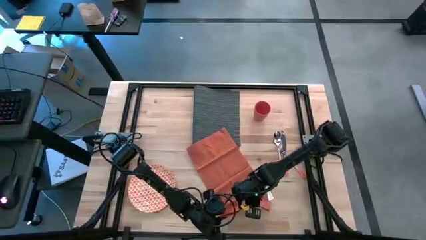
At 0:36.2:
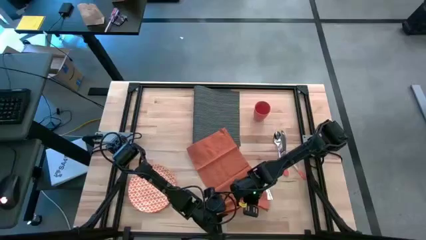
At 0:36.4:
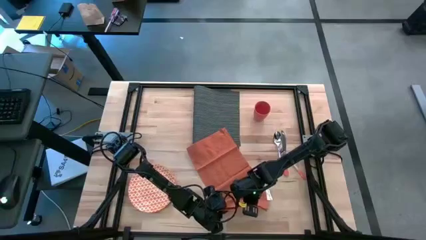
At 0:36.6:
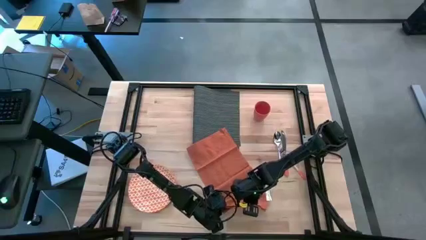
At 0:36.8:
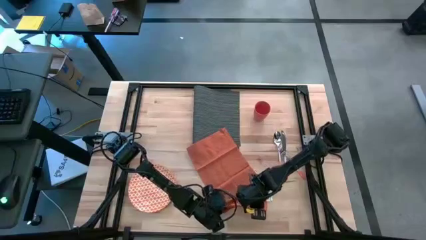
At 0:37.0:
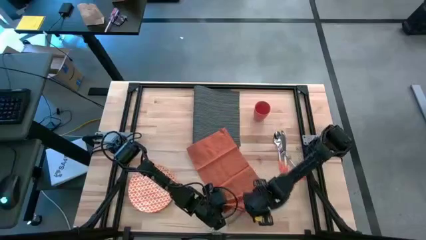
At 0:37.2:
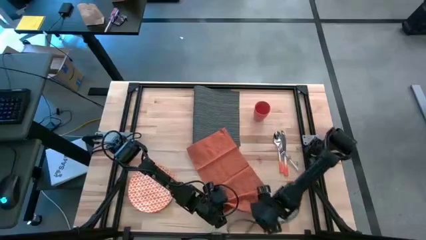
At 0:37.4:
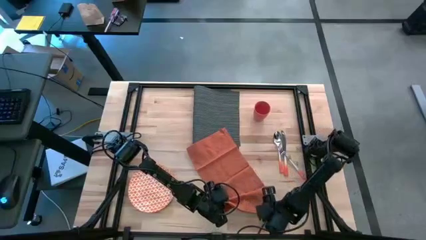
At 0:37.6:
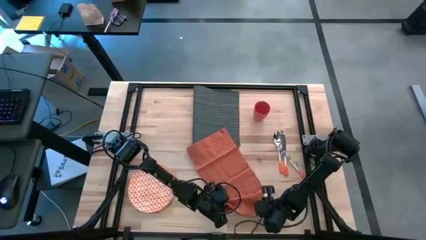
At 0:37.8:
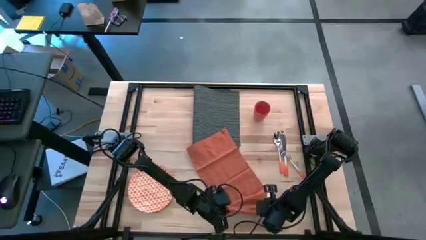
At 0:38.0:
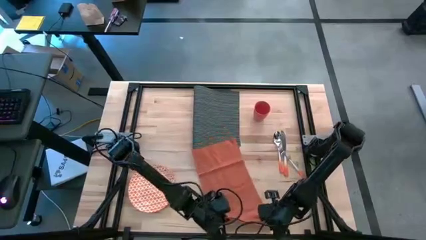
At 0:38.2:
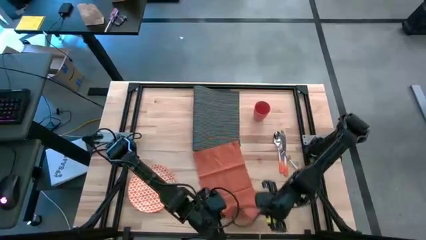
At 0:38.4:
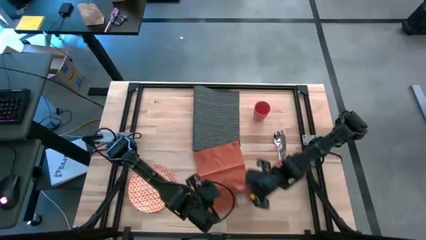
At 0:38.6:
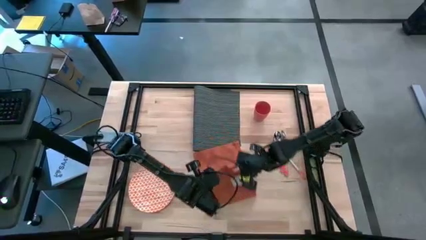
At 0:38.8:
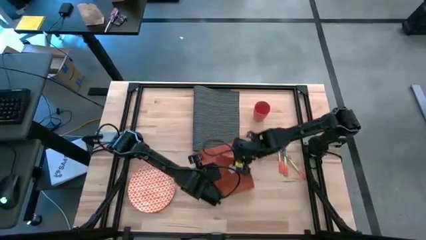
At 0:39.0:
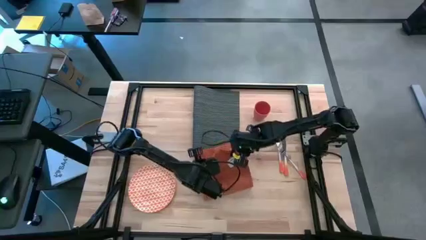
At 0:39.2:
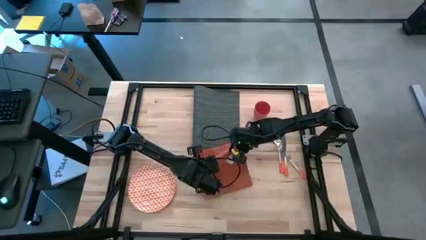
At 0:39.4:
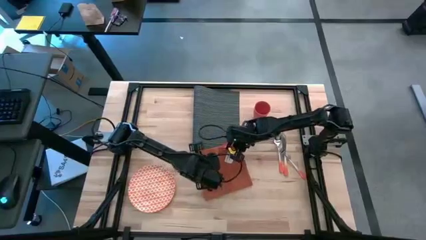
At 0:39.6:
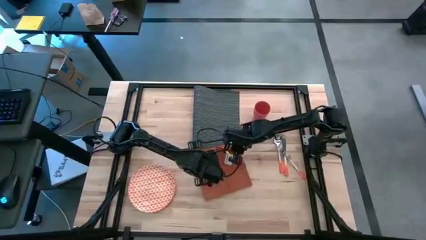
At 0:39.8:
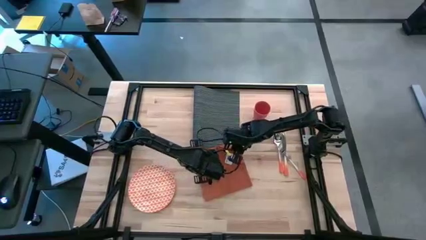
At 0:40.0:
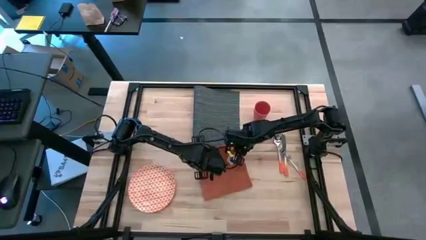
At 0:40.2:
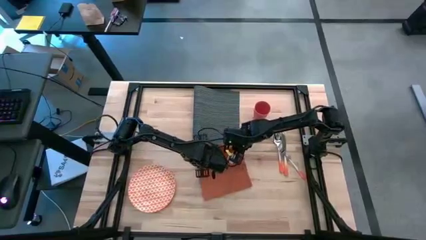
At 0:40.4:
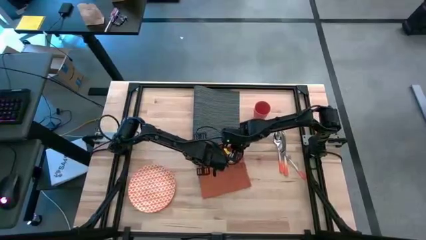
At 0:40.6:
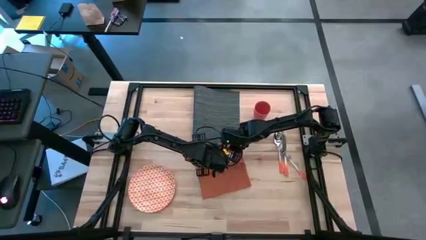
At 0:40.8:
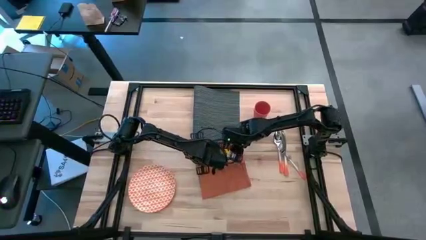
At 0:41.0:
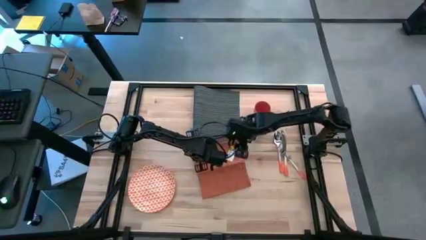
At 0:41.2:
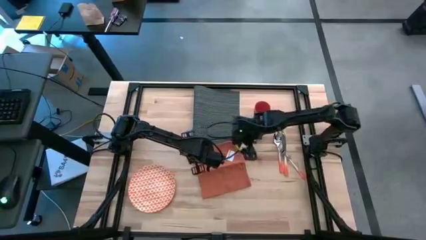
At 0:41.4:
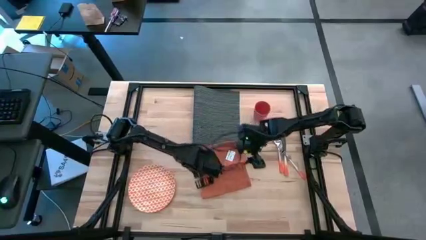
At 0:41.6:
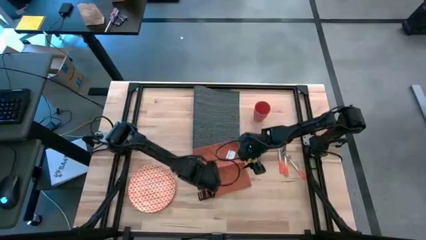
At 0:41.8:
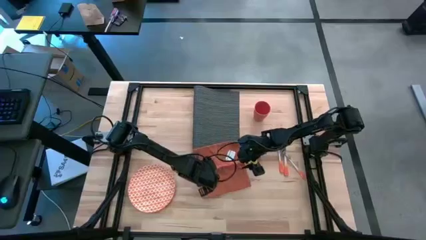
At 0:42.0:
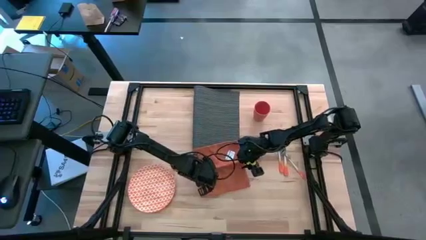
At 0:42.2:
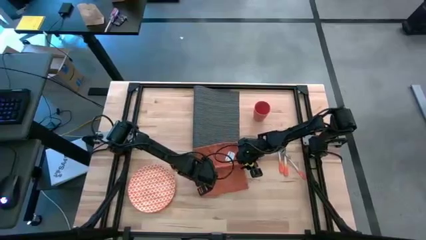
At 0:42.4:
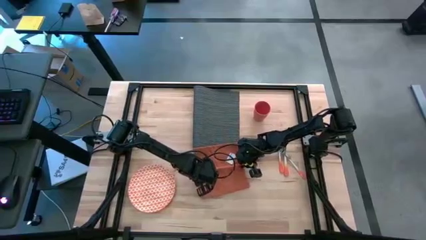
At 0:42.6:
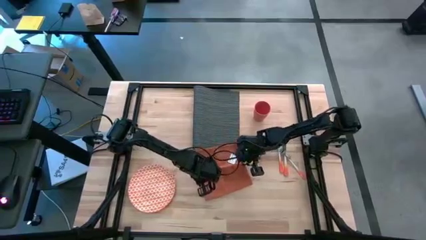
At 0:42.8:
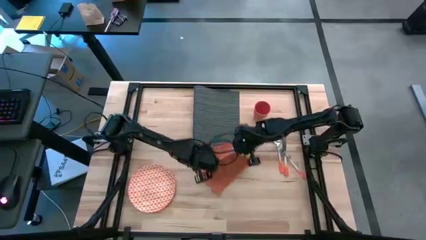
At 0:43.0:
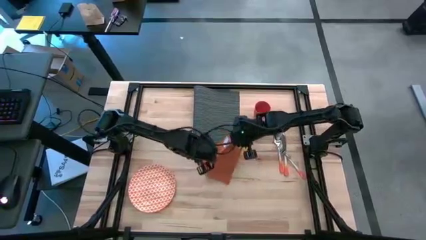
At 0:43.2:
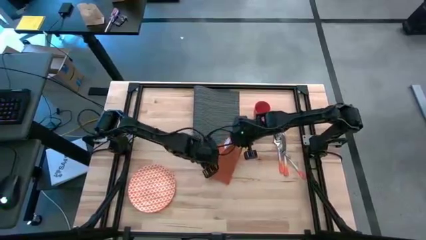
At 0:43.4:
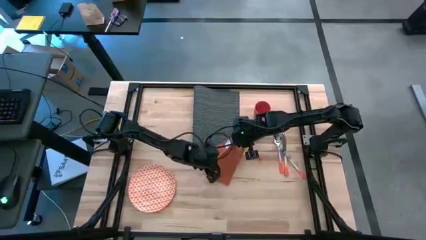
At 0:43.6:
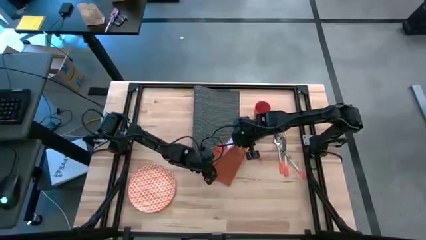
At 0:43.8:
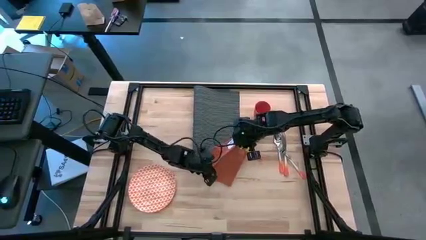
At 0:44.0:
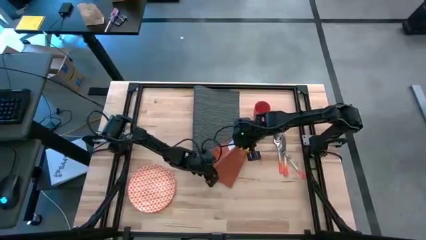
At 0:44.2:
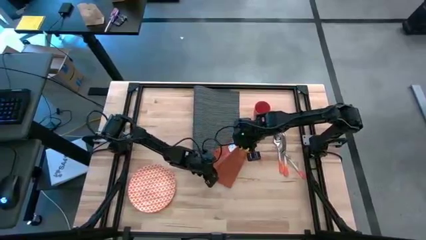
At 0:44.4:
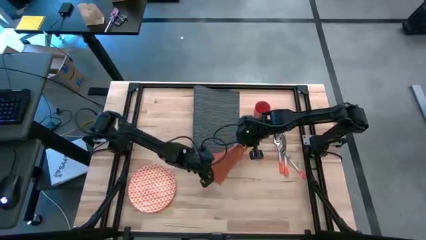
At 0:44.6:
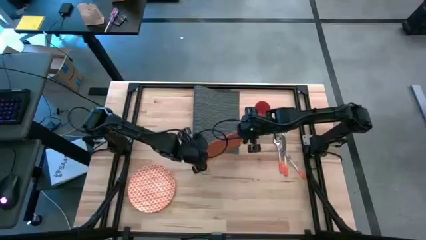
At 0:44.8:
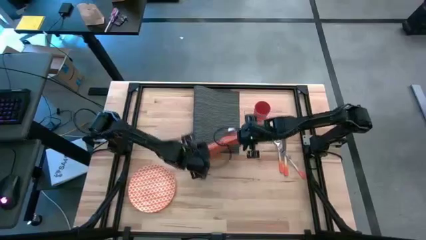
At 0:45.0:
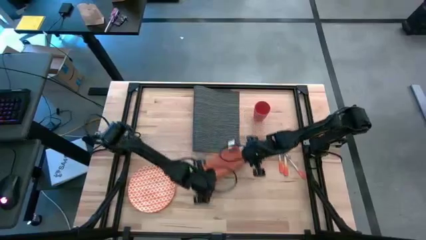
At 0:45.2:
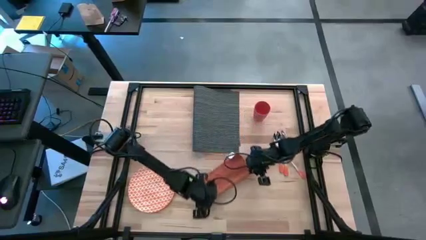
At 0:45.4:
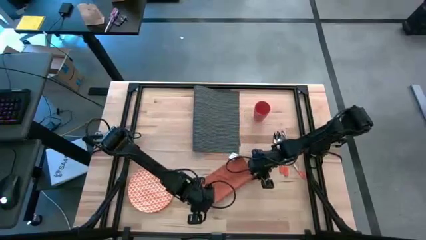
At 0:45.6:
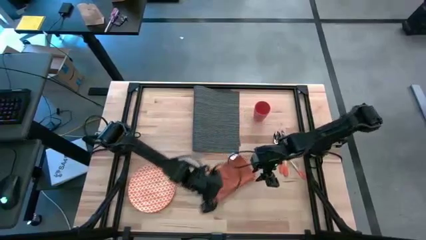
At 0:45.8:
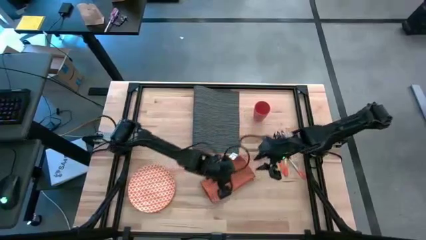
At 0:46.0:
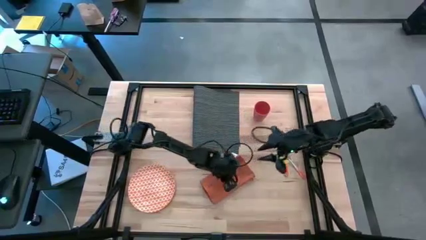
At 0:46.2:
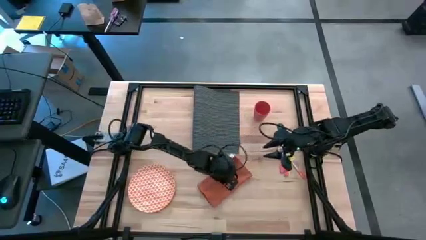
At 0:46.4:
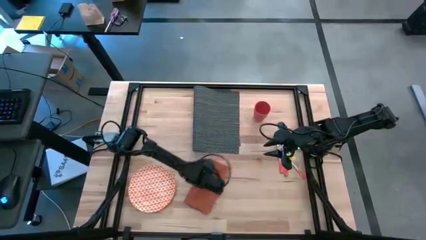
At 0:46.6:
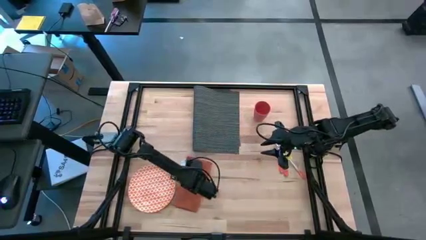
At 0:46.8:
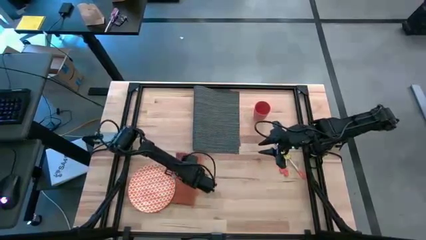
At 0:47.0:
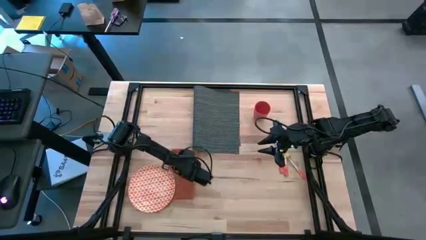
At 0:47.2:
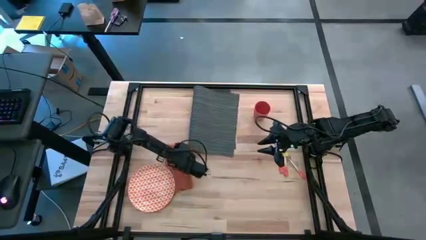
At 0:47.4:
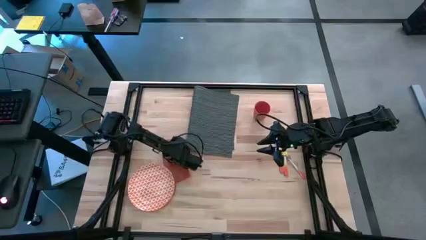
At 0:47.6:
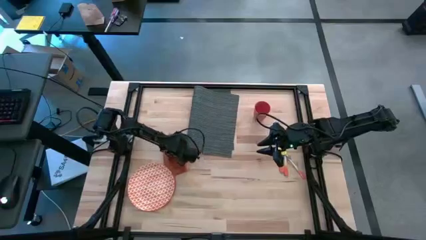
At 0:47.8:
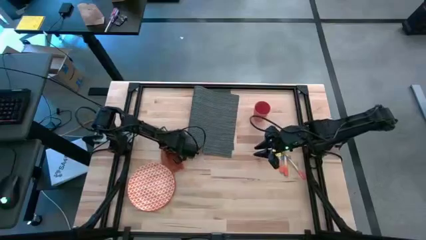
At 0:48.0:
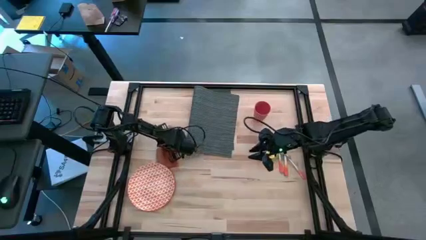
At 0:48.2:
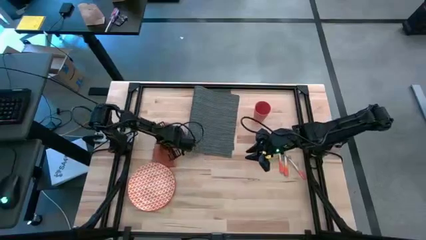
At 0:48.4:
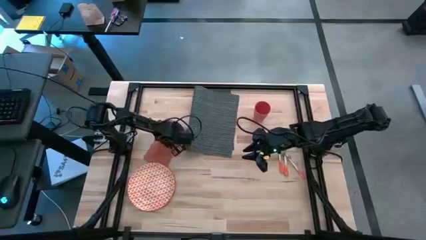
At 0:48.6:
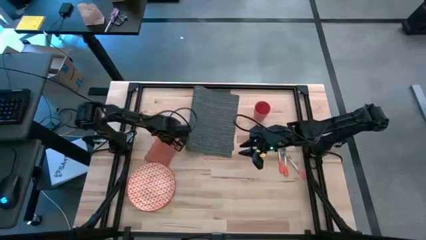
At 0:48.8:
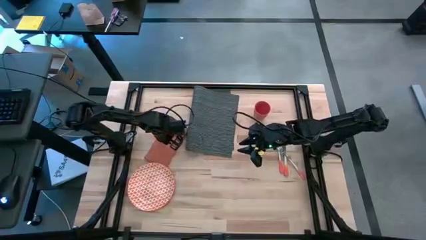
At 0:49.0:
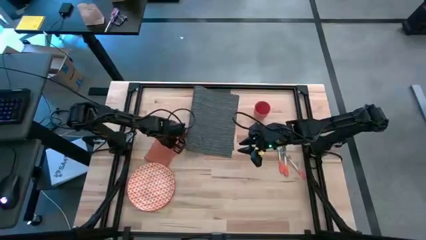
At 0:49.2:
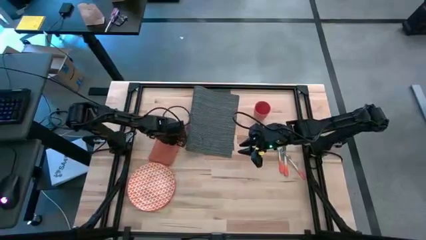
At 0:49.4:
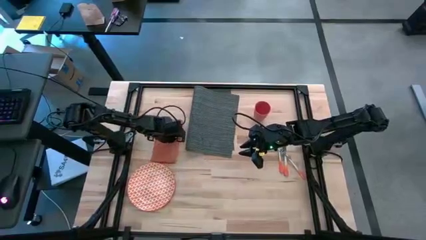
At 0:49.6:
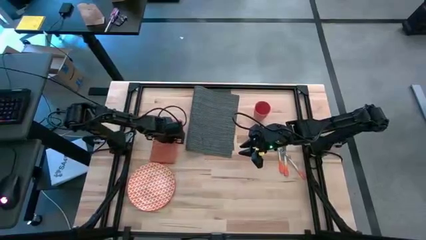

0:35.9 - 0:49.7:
Task: Set table place
Fold the orange table napkin

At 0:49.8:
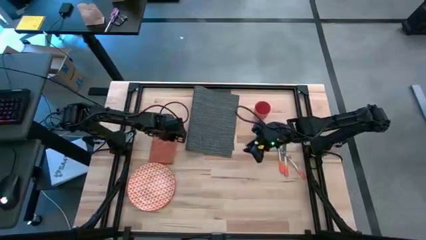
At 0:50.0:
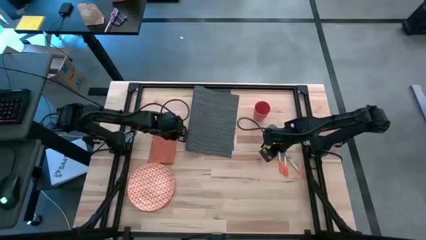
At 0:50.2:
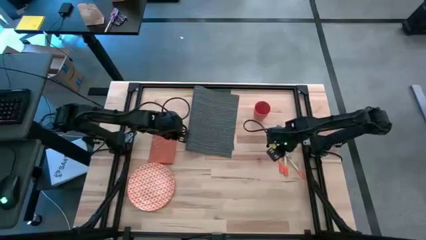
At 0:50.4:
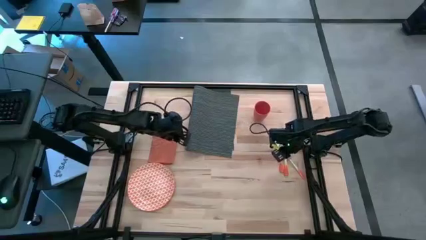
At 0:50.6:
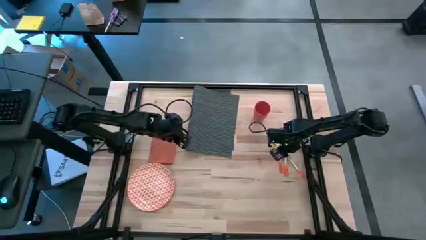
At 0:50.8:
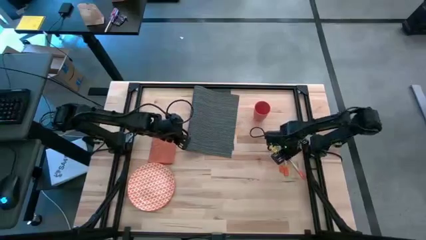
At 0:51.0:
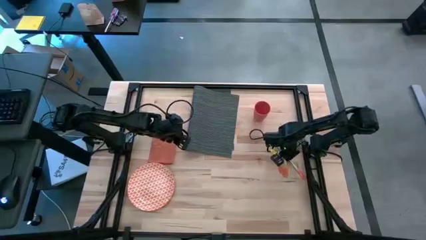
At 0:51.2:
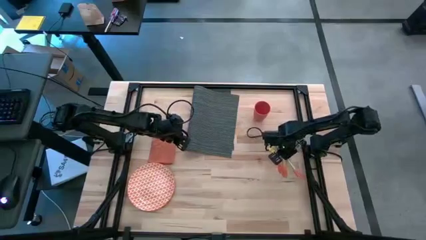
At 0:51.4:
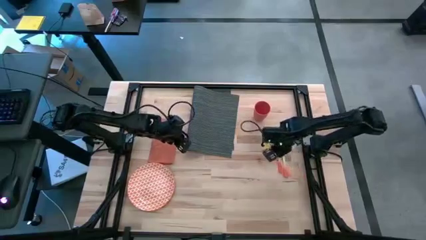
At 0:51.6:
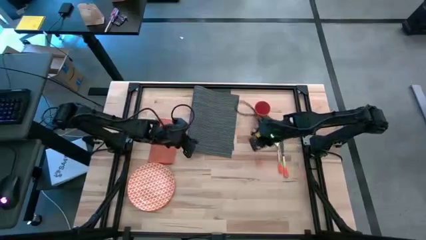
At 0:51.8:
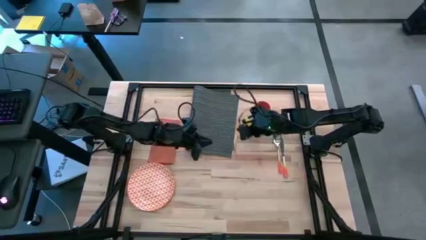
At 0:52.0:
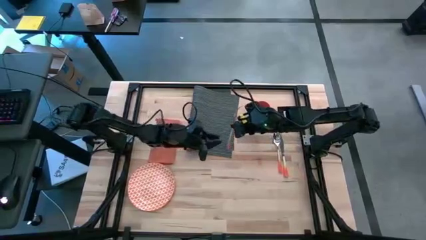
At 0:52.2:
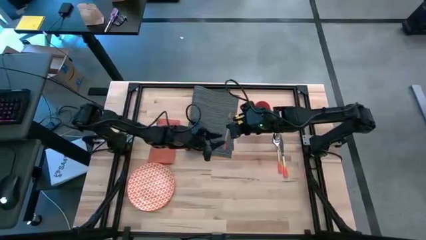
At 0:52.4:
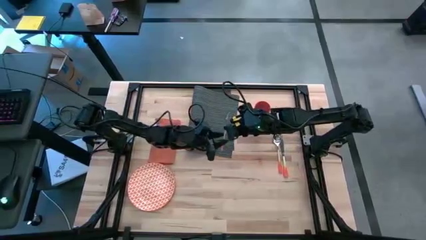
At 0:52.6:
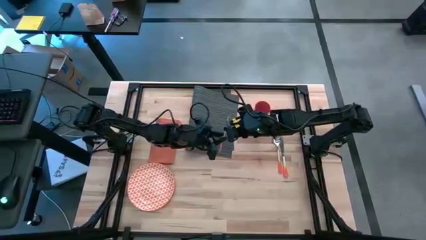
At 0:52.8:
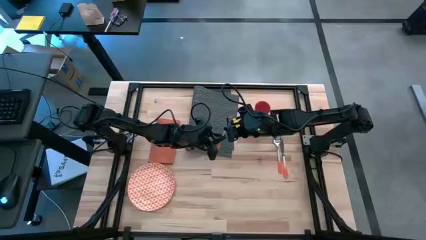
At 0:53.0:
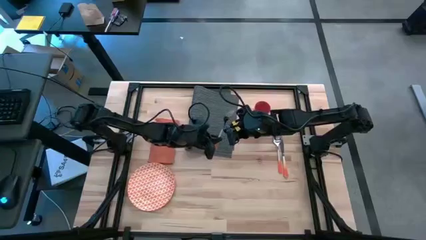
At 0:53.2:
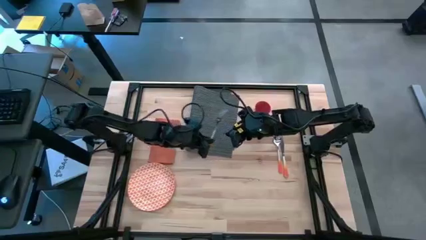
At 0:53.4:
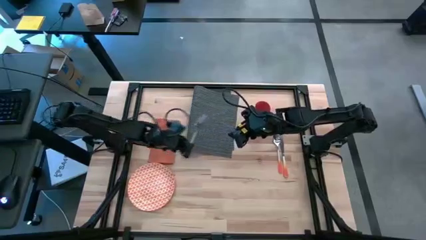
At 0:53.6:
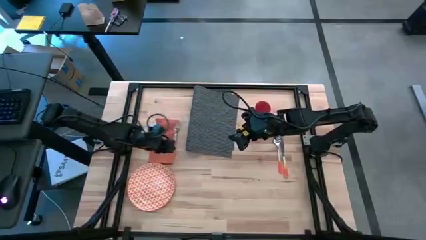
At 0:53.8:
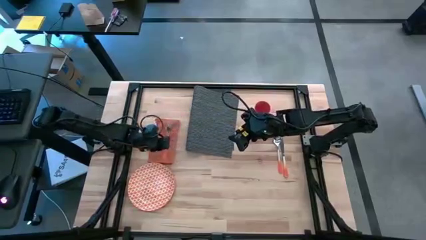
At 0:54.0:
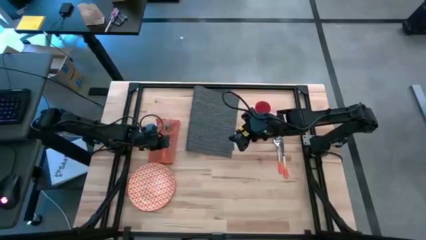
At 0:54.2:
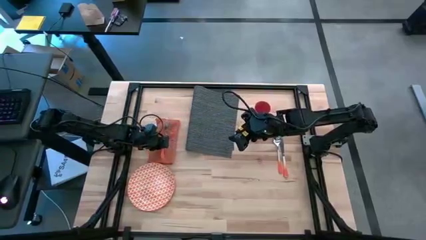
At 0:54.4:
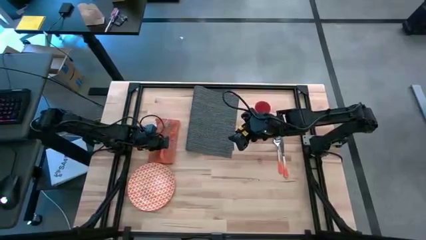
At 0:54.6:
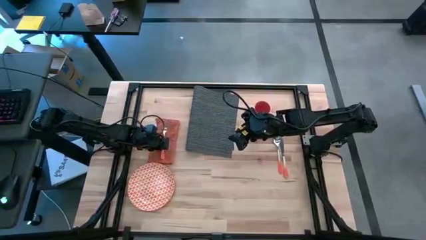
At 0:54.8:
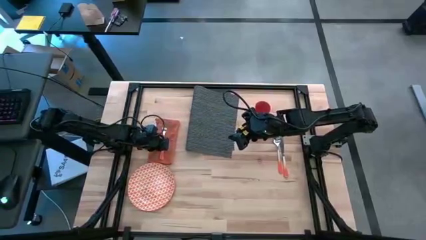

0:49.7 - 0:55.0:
Put the orange fork on top of the table napkin
